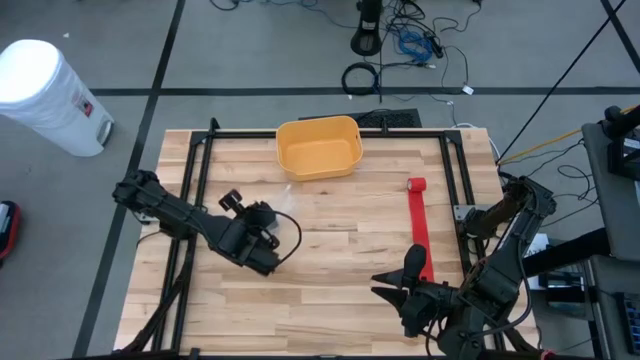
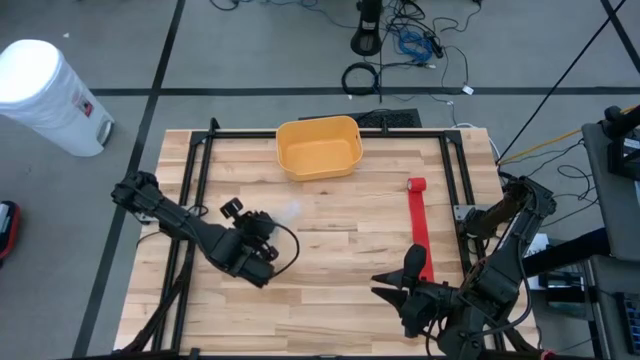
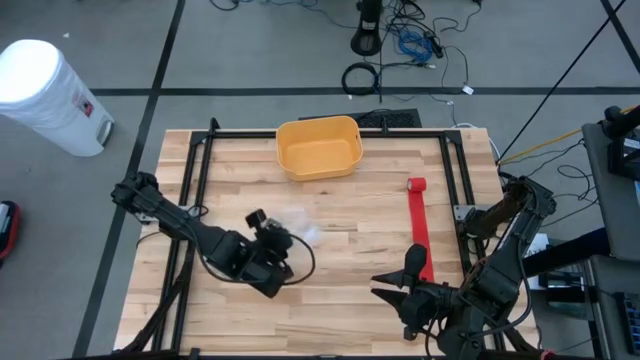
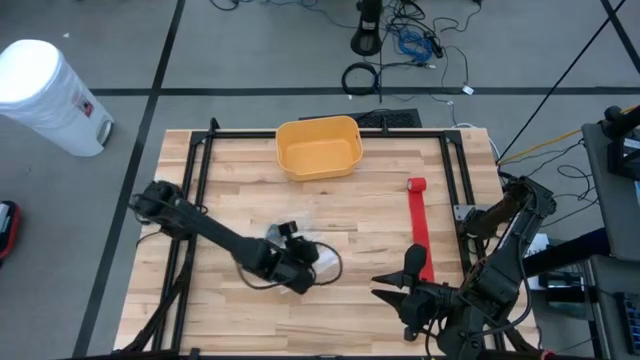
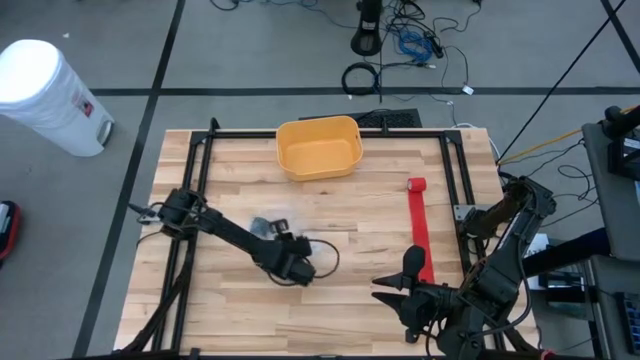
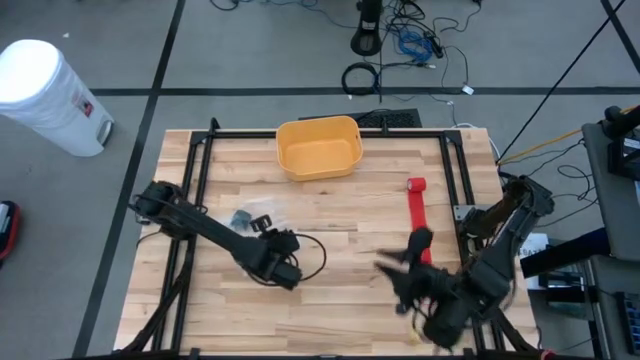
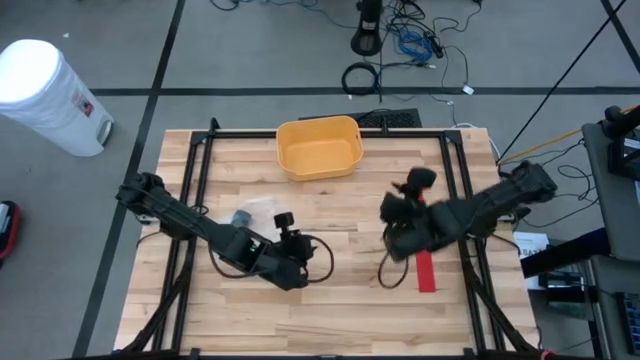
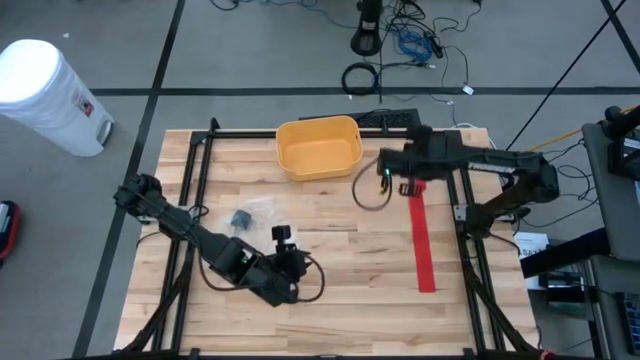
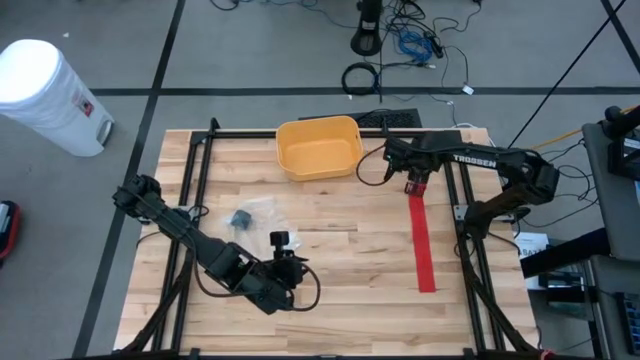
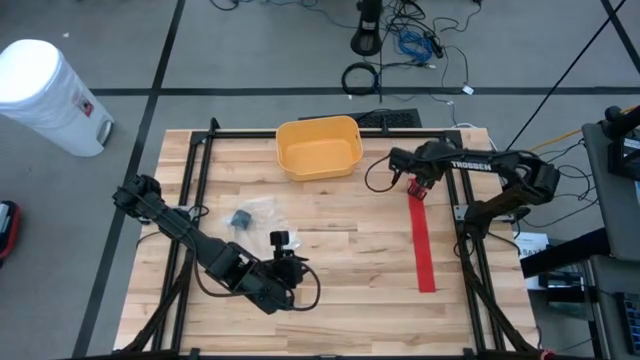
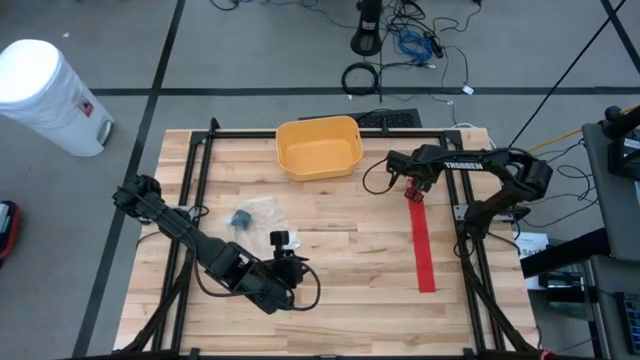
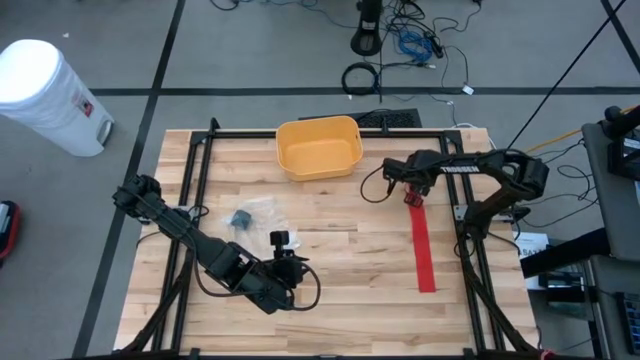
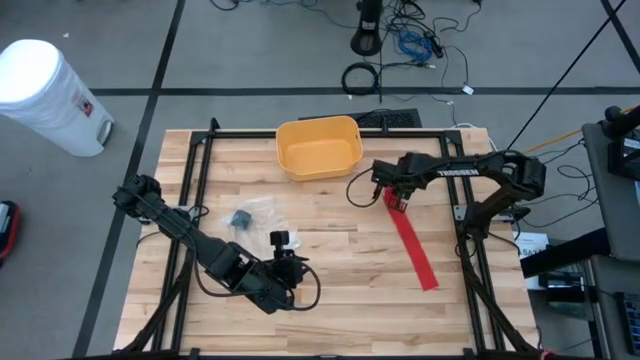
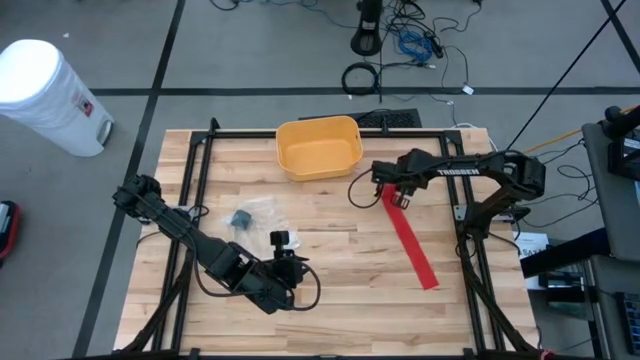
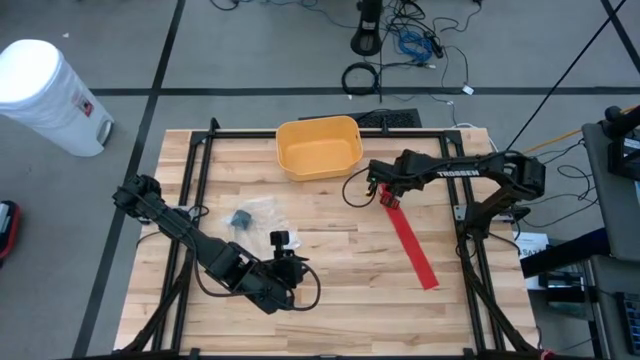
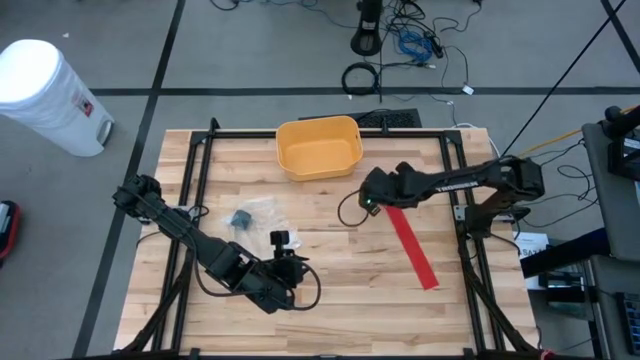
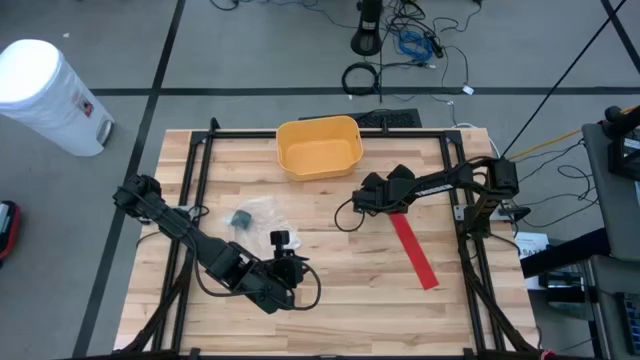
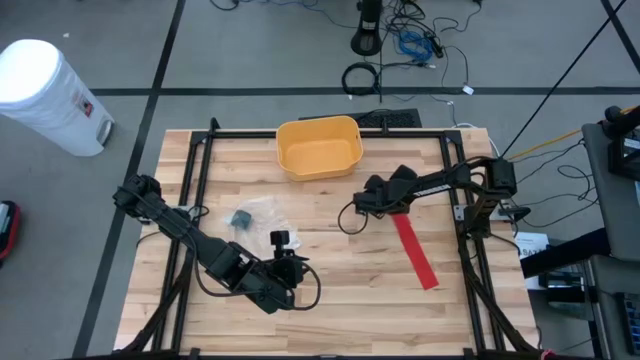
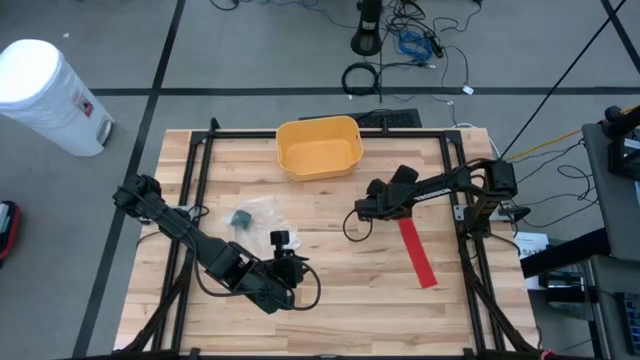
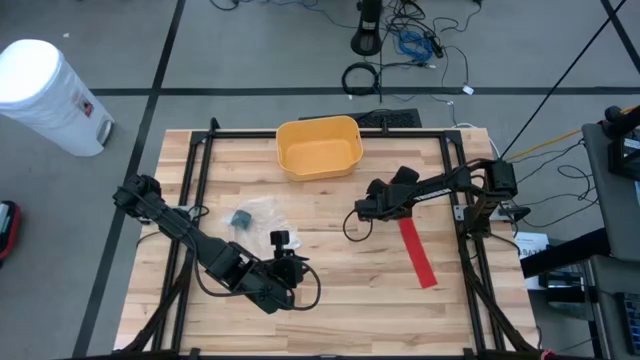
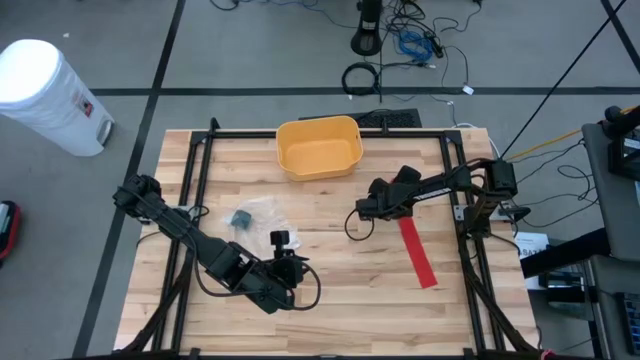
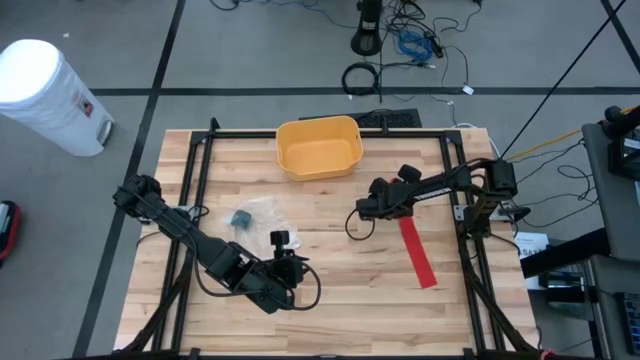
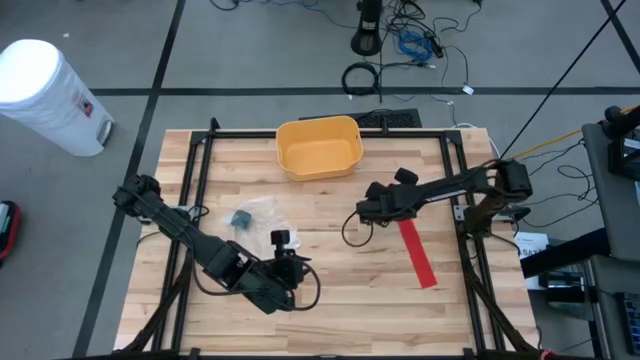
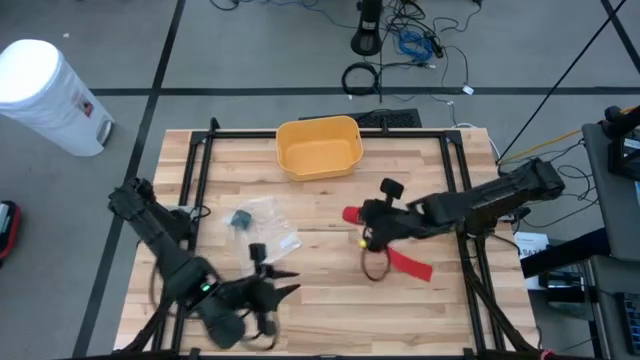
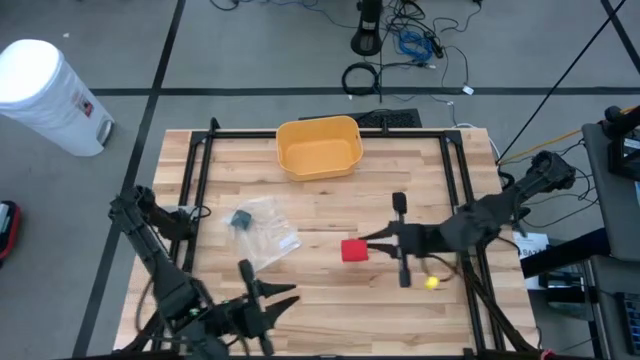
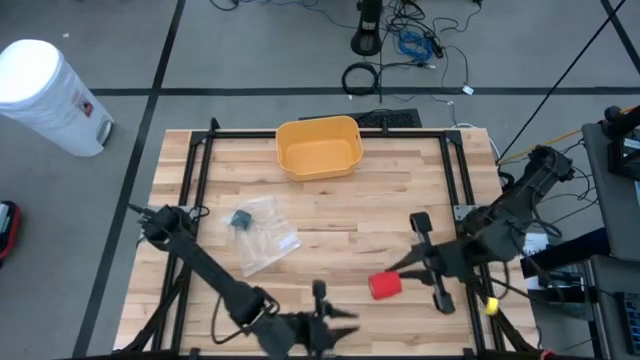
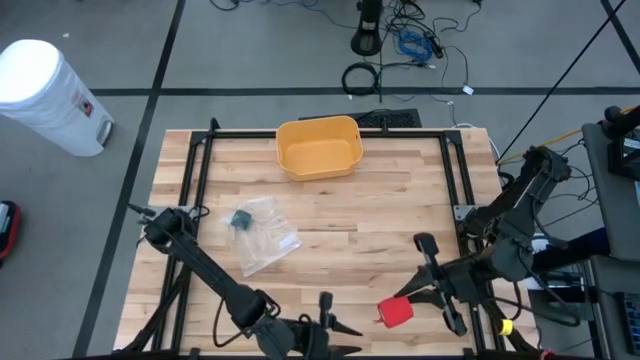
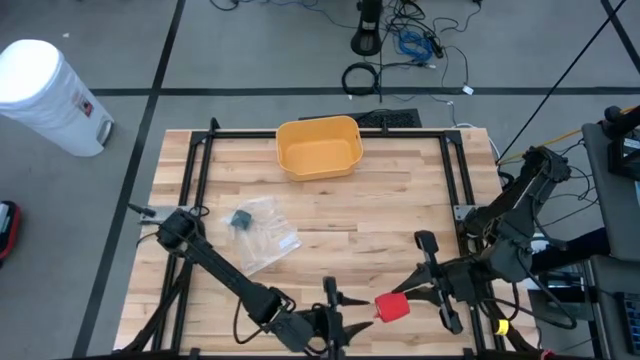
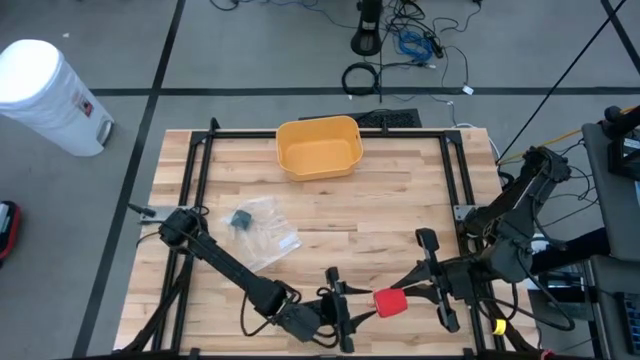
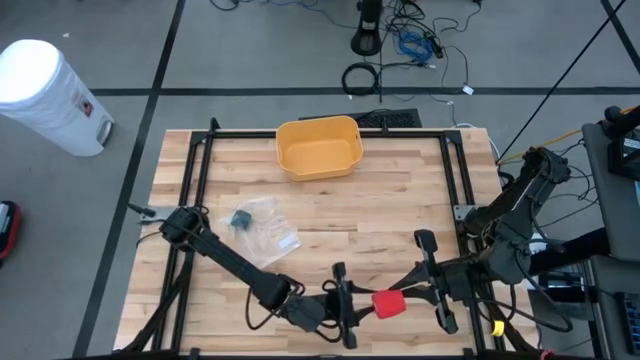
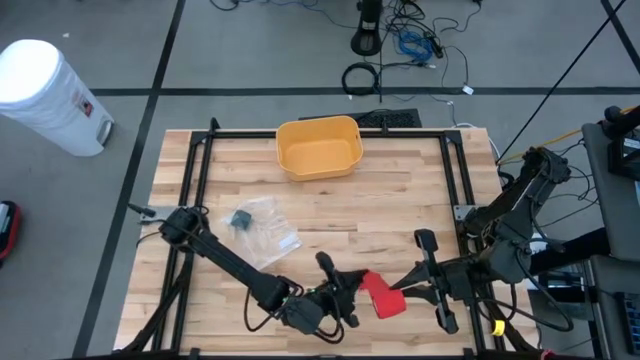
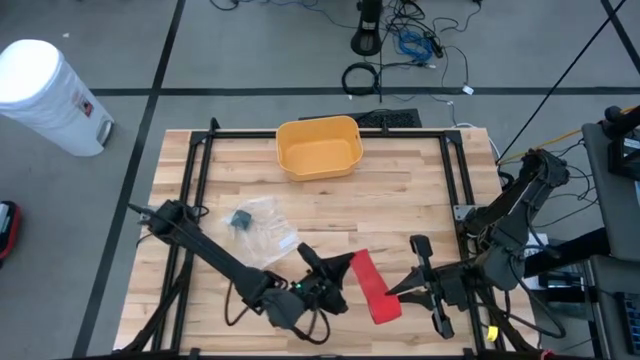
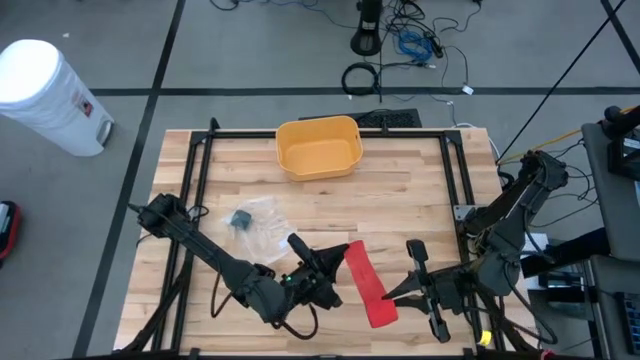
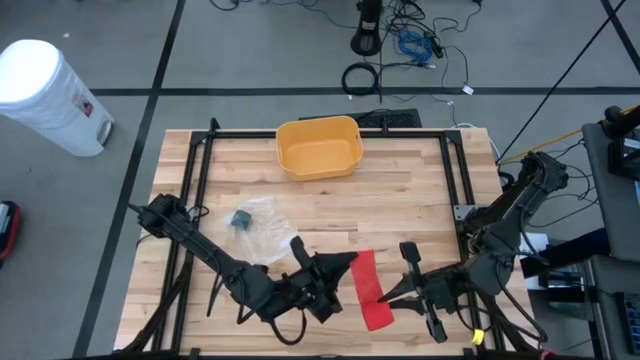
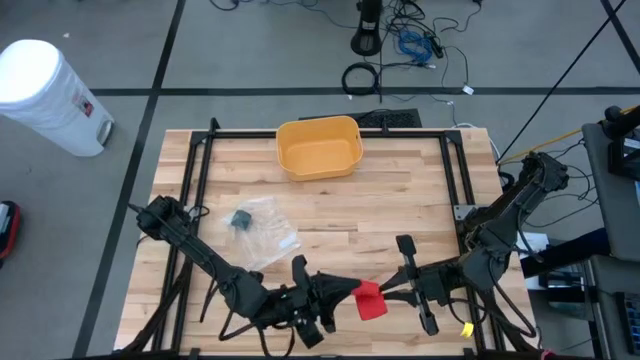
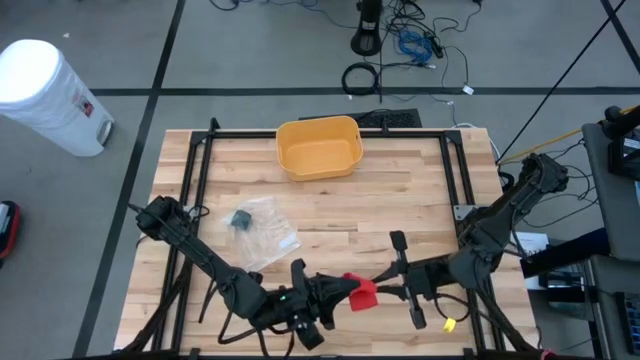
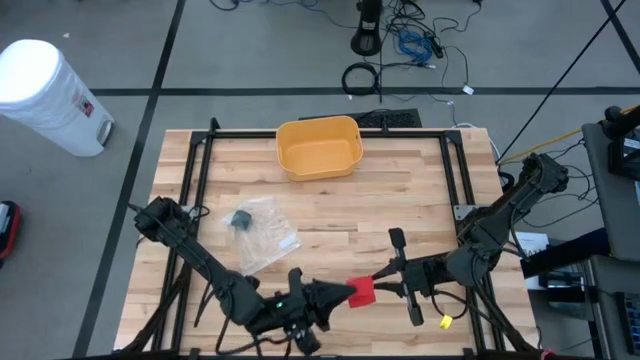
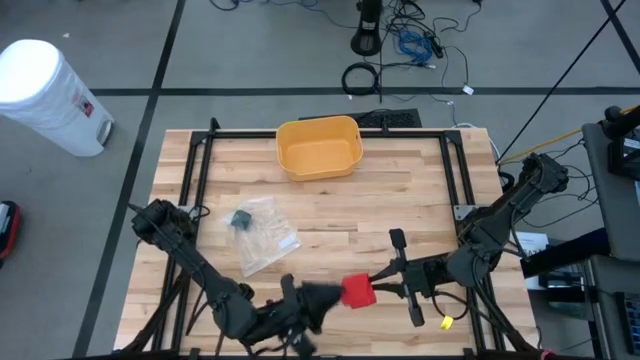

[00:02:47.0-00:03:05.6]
Task: Roll bandage
Roll the red bandage

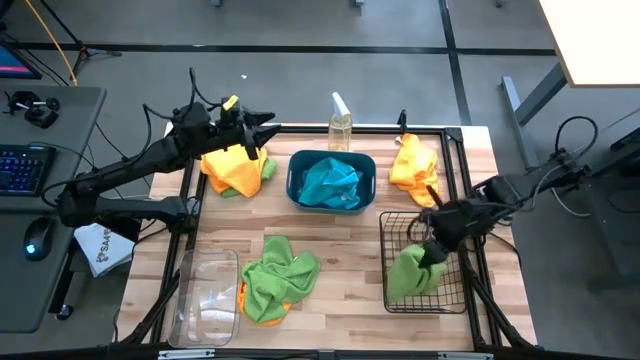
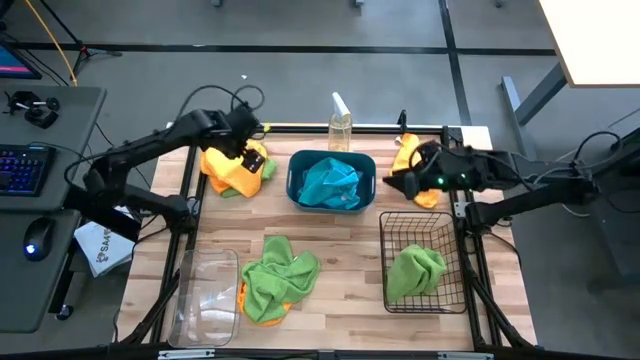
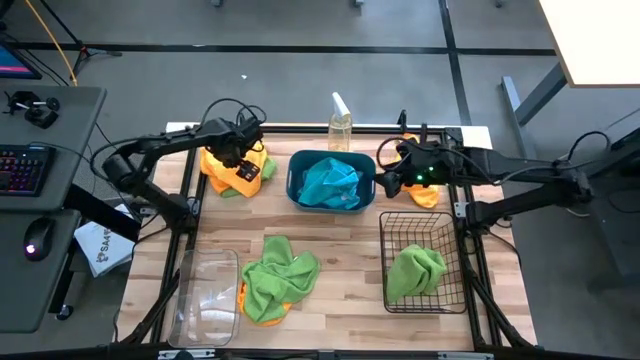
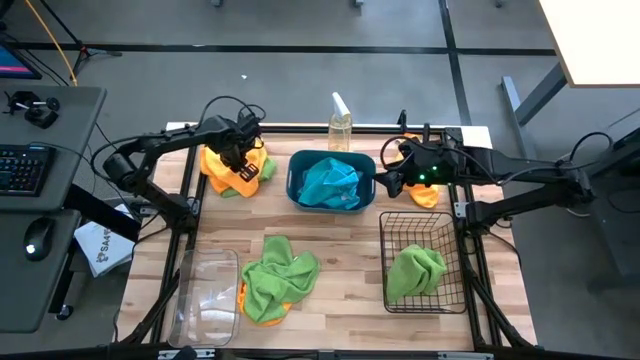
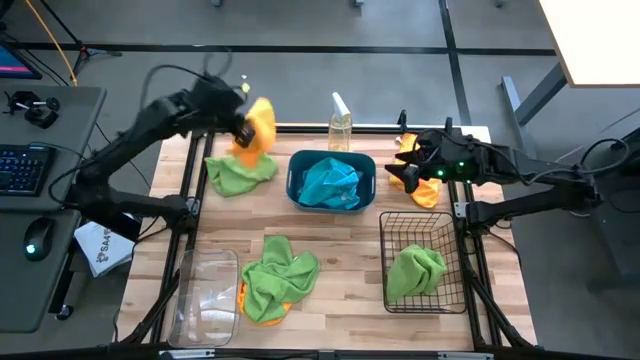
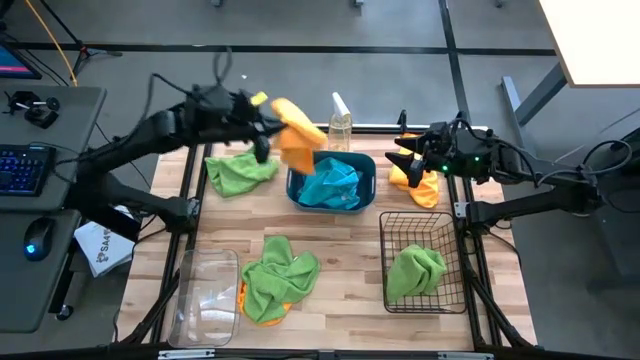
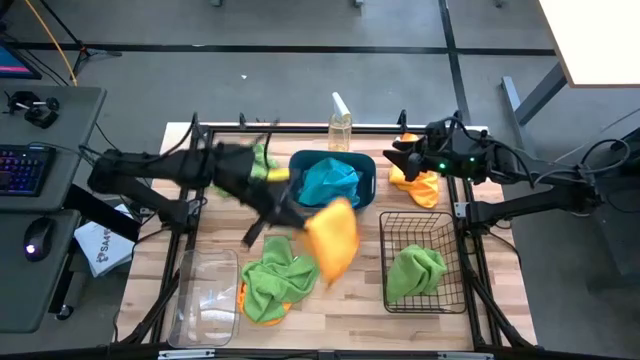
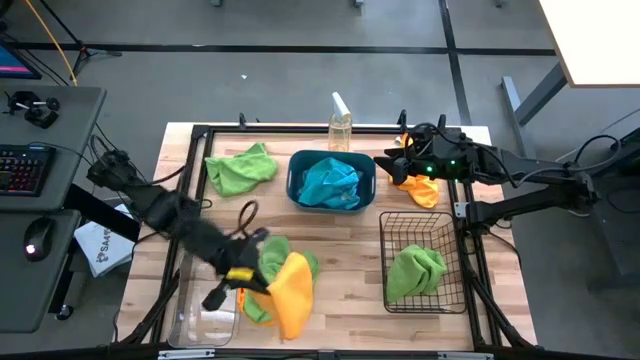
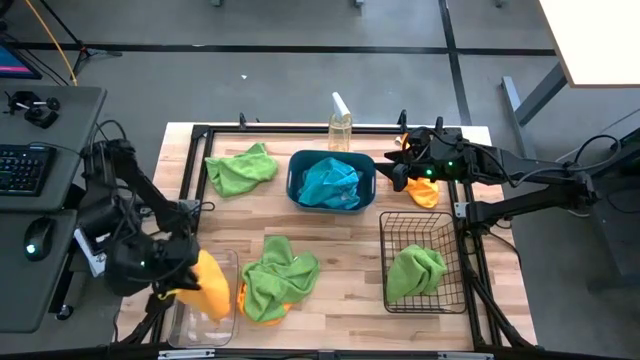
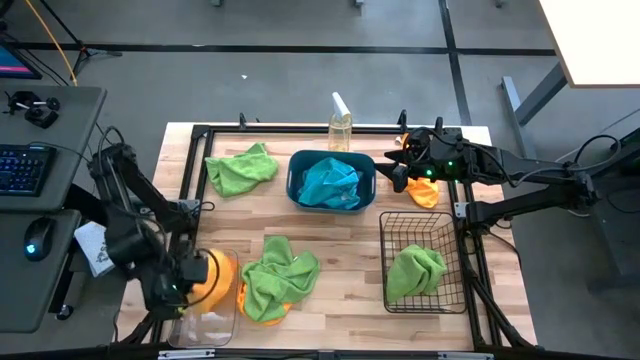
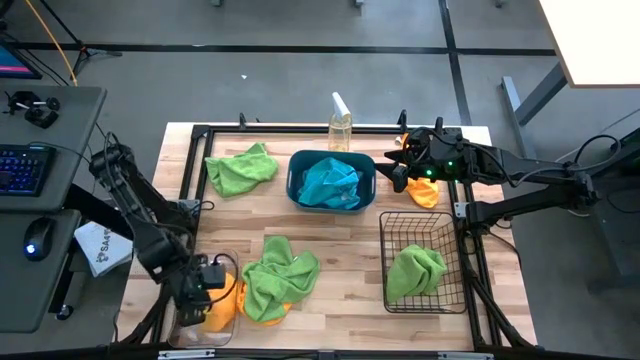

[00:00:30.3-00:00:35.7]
Task: Sort microfiber towel by color & place in baskets
Put the top left orange towel into the transparent bin
